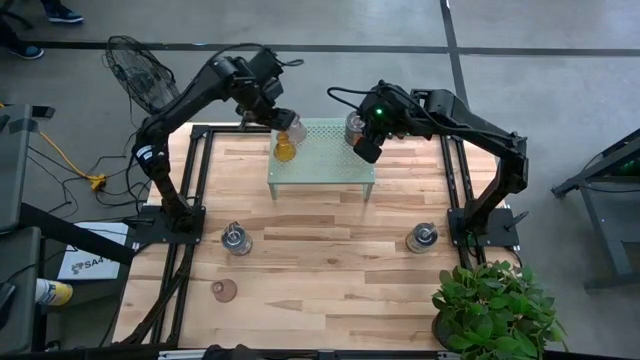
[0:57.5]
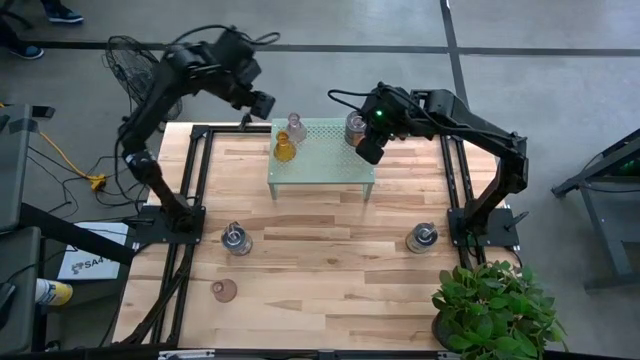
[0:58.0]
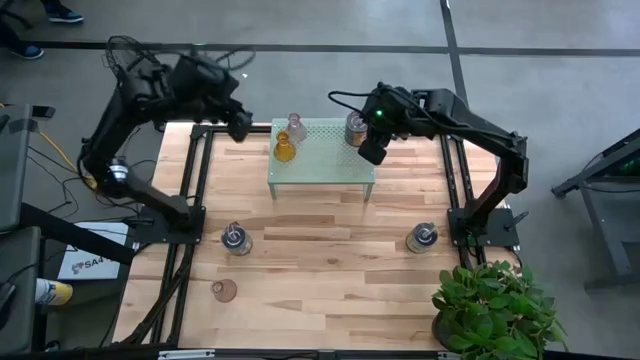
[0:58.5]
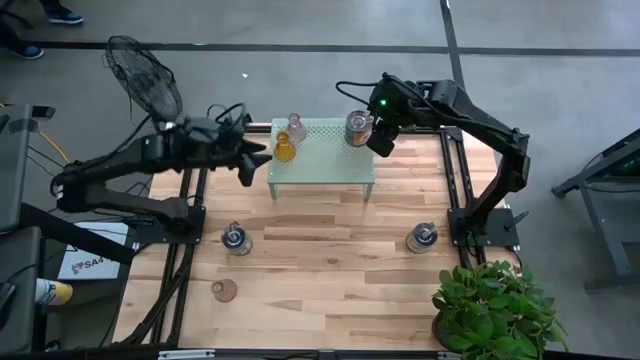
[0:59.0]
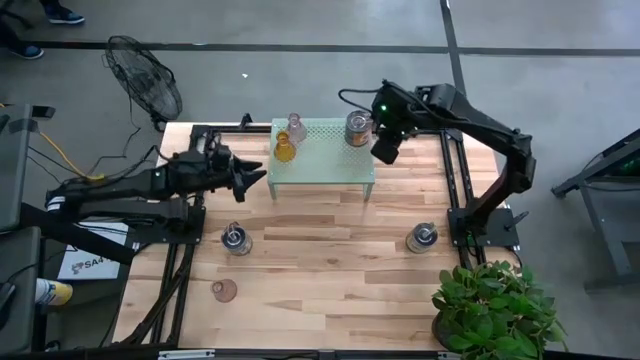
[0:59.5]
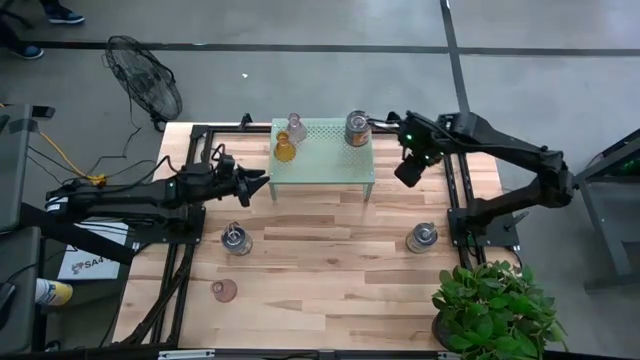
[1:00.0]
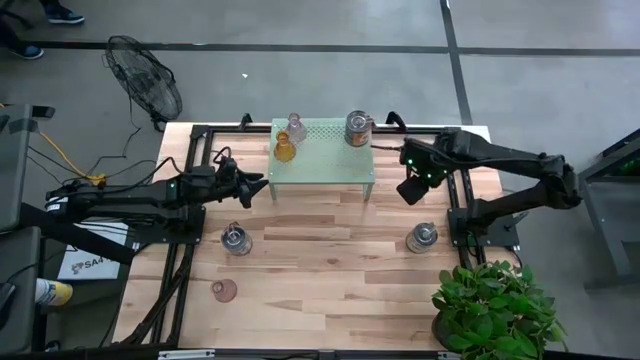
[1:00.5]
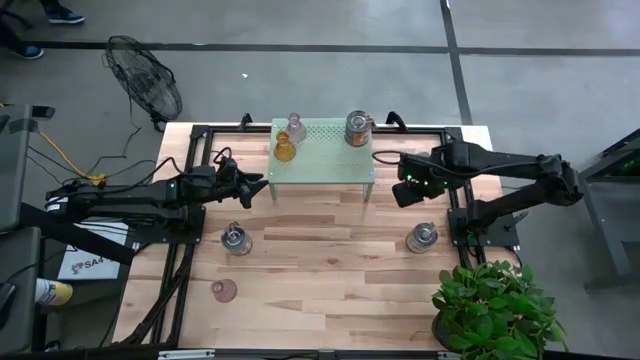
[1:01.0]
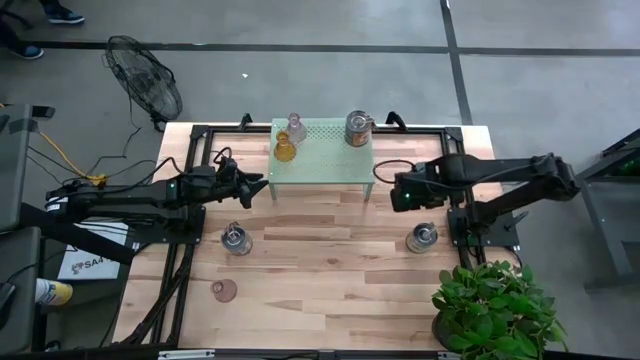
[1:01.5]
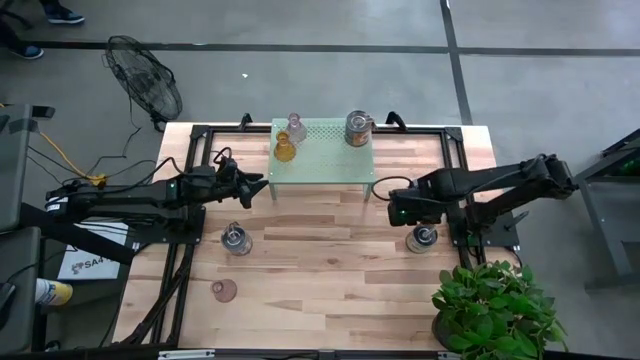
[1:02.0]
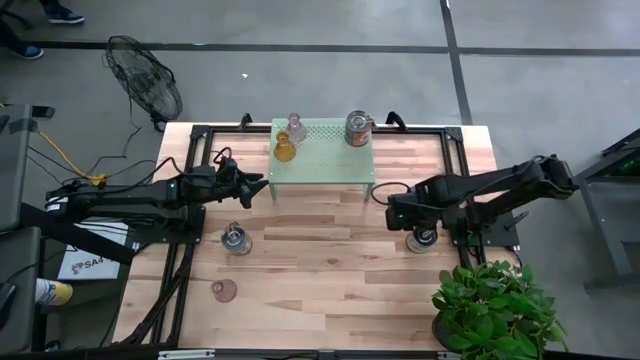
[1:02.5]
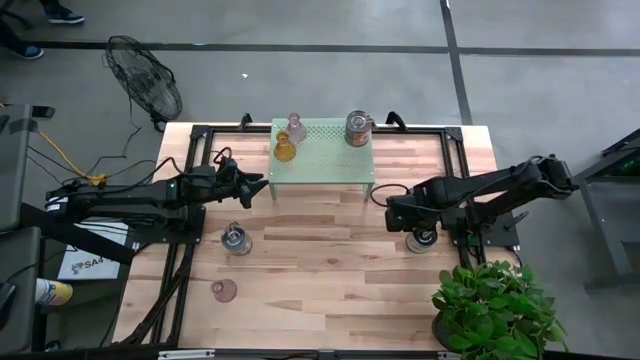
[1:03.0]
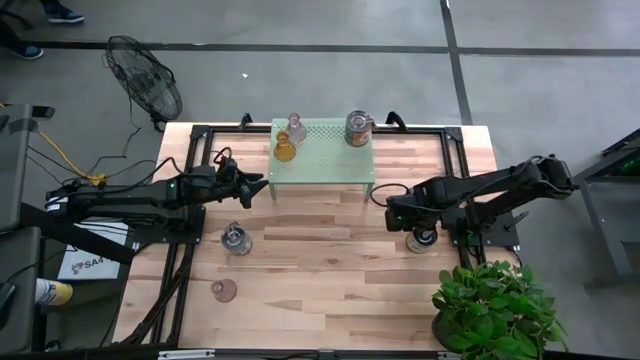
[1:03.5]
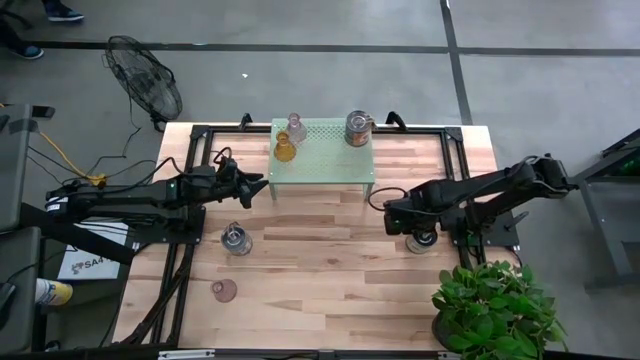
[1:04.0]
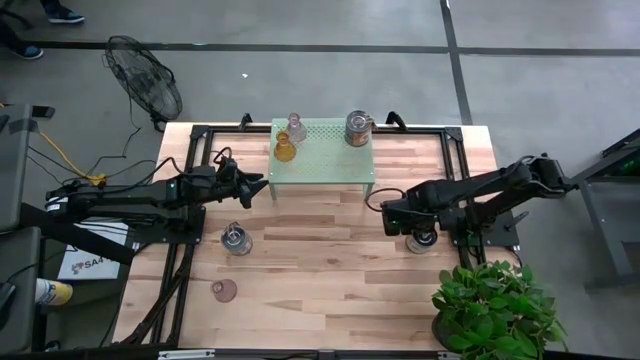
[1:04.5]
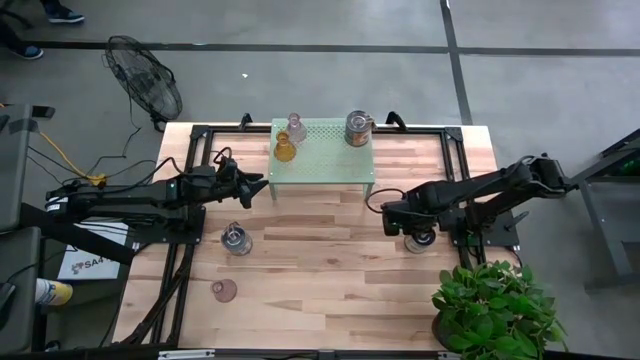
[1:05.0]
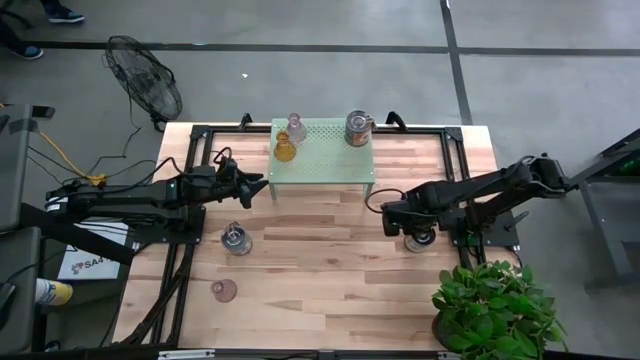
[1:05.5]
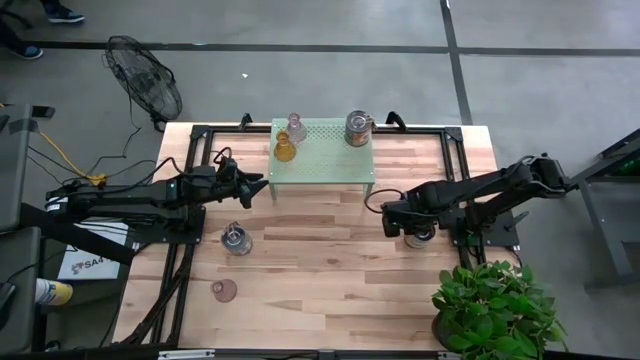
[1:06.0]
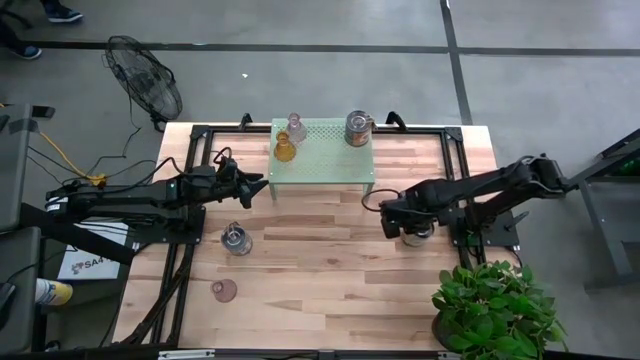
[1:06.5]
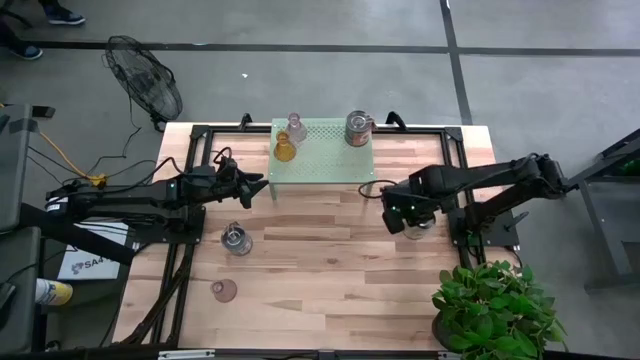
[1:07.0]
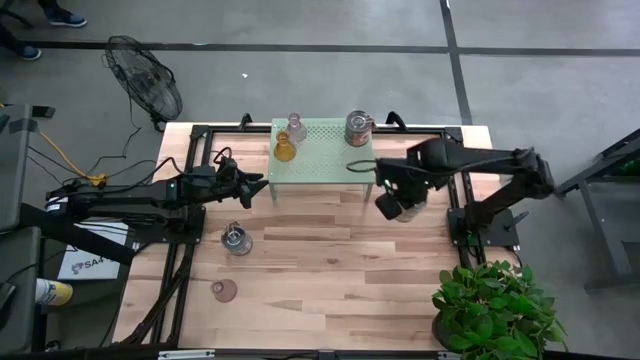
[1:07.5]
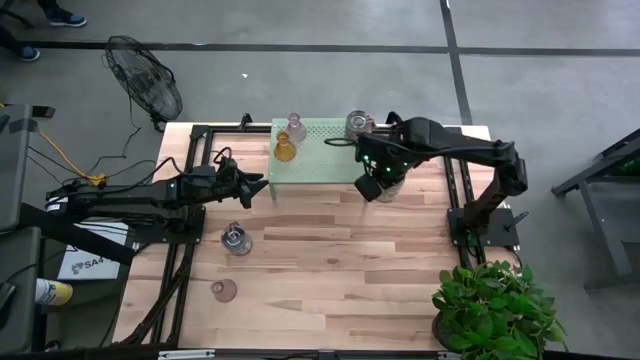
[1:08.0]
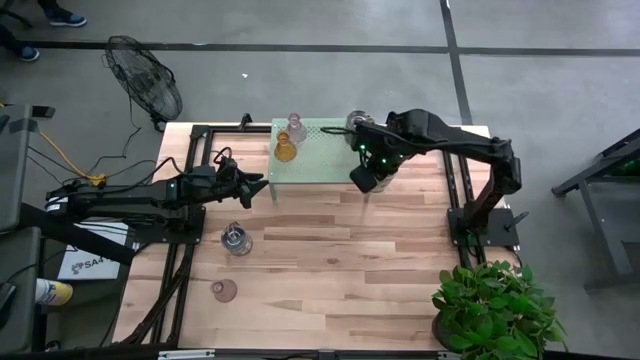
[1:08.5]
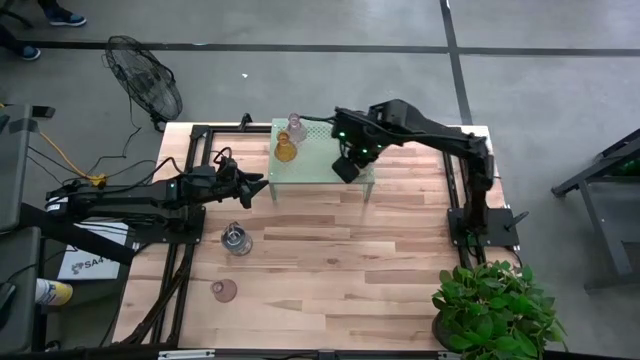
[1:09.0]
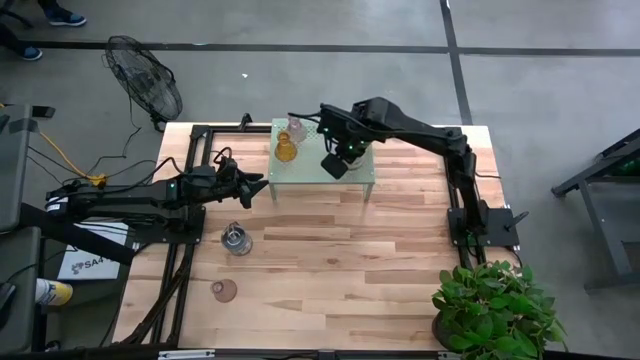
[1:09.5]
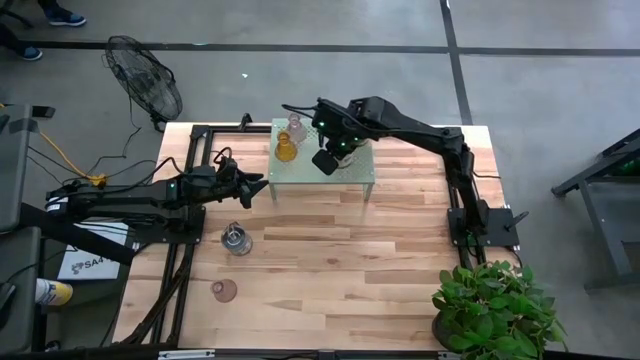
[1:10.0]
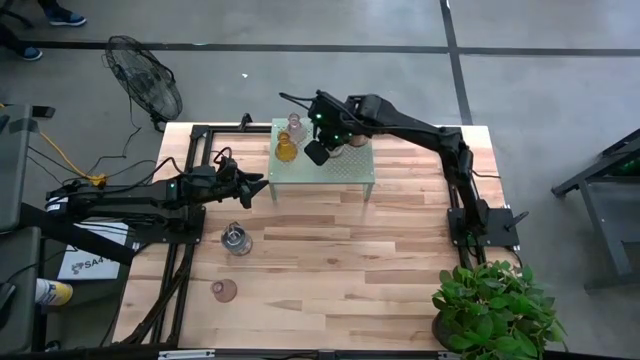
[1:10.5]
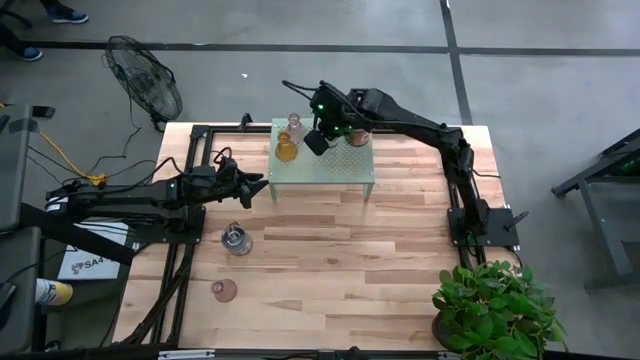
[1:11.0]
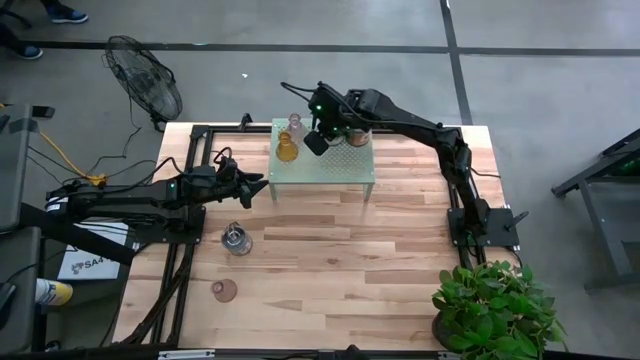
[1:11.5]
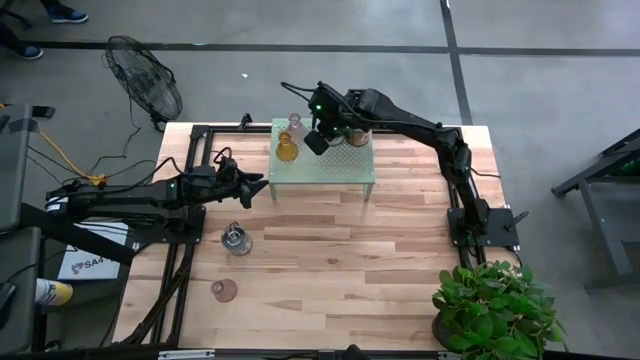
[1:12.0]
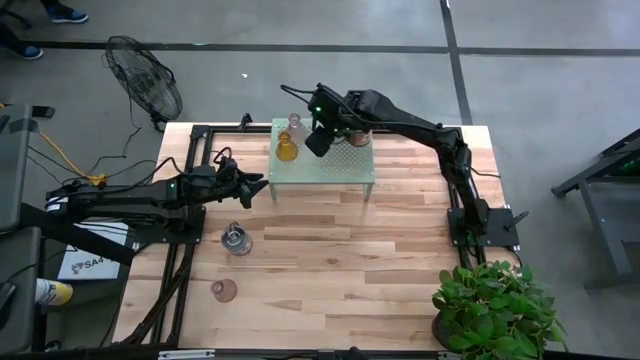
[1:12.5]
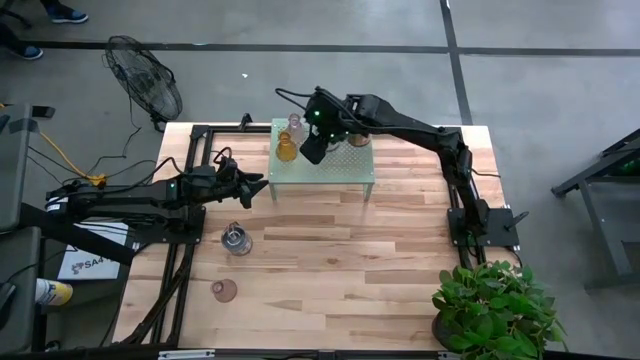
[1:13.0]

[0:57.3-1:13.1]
Task: Pick & Place candle stick holders
Put the right silver scented candle on the shelf

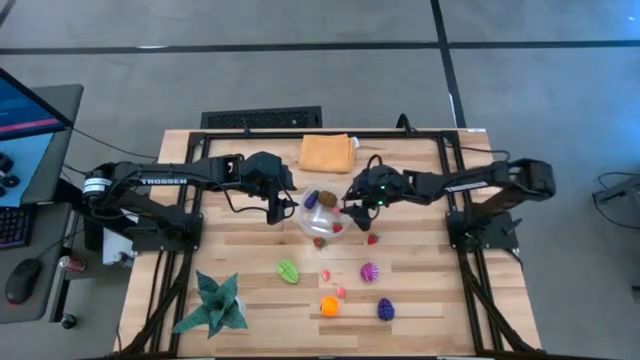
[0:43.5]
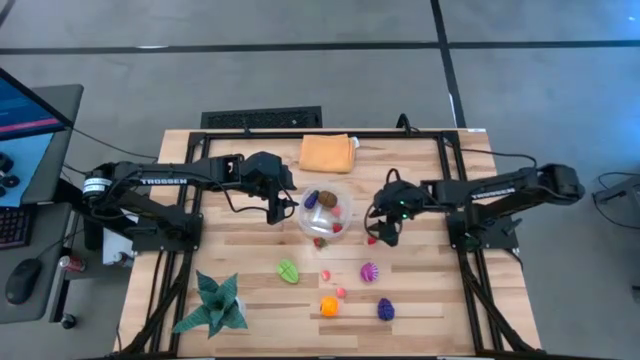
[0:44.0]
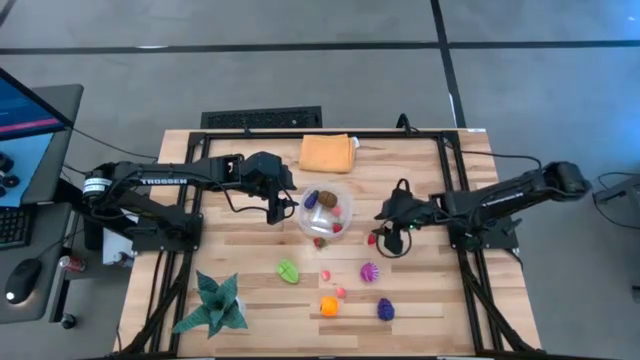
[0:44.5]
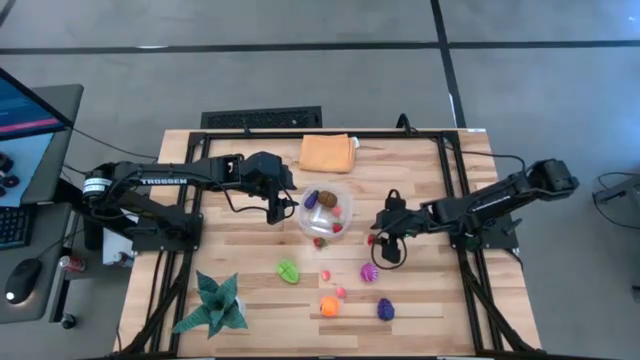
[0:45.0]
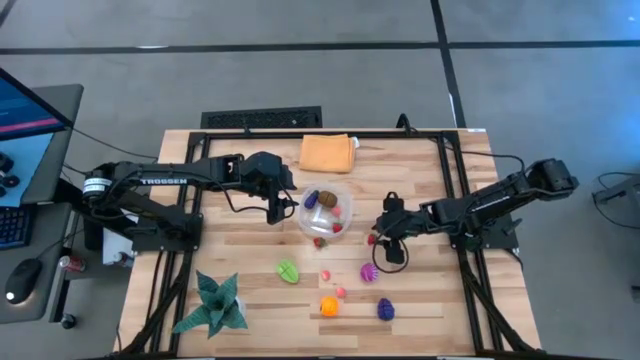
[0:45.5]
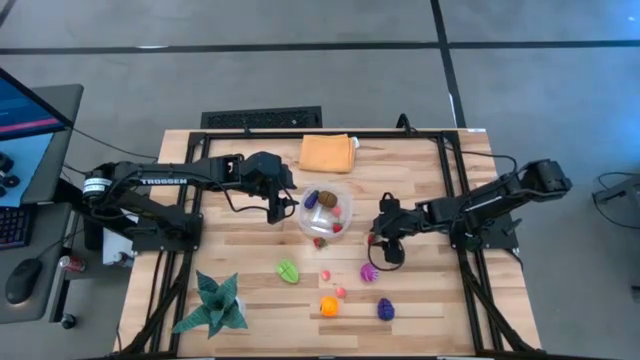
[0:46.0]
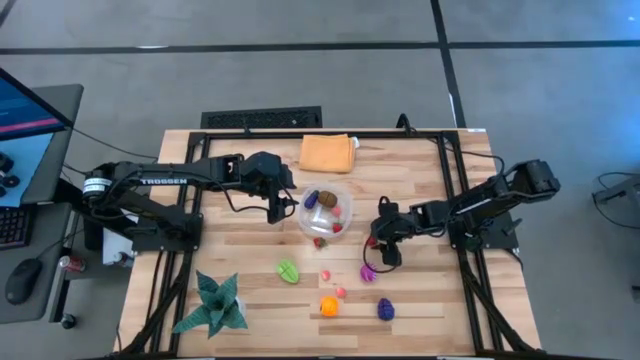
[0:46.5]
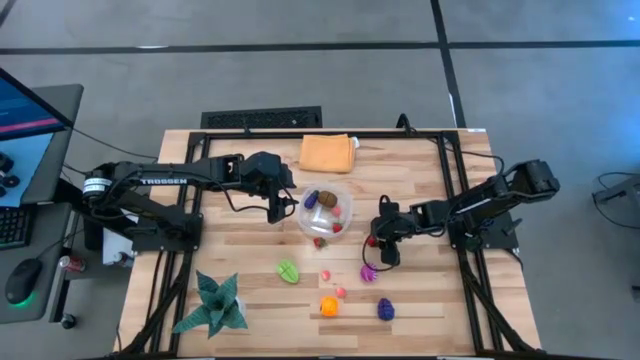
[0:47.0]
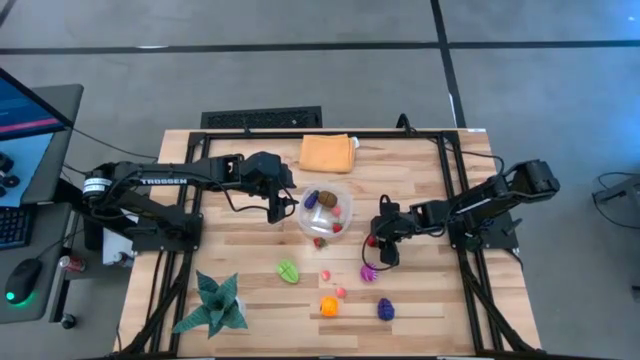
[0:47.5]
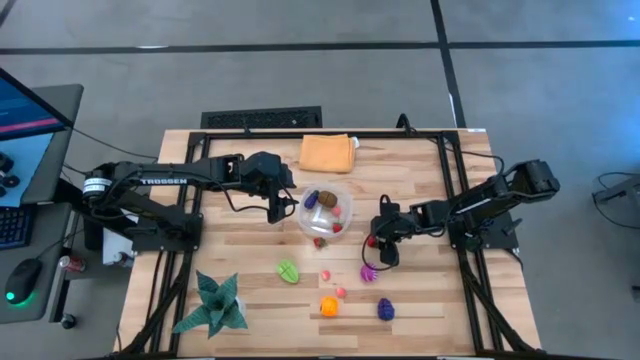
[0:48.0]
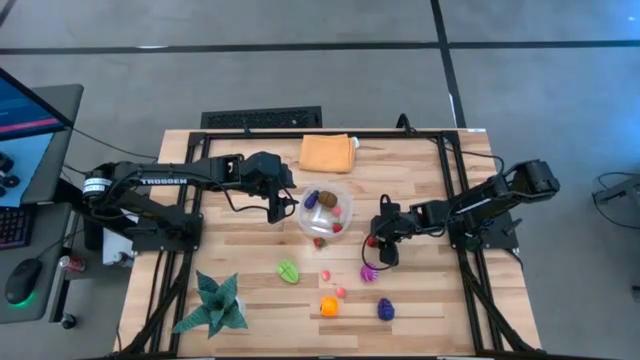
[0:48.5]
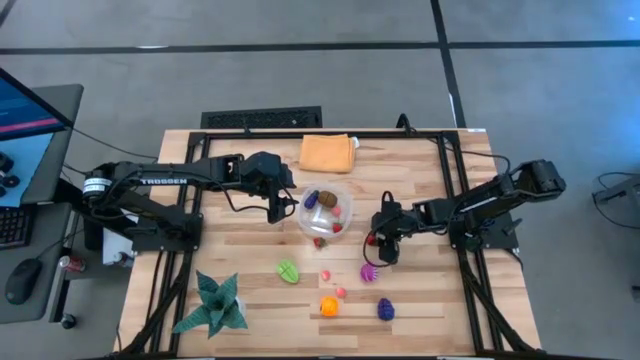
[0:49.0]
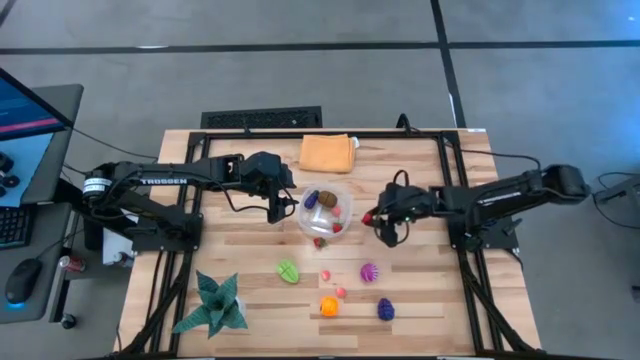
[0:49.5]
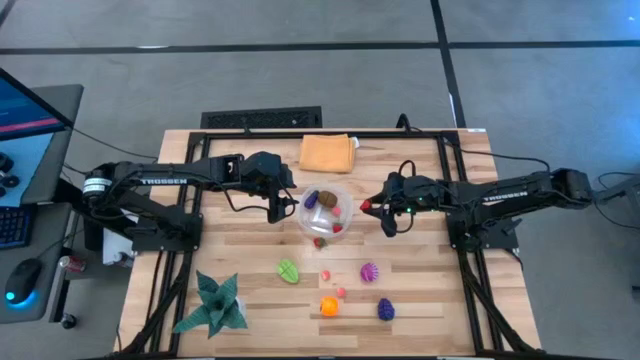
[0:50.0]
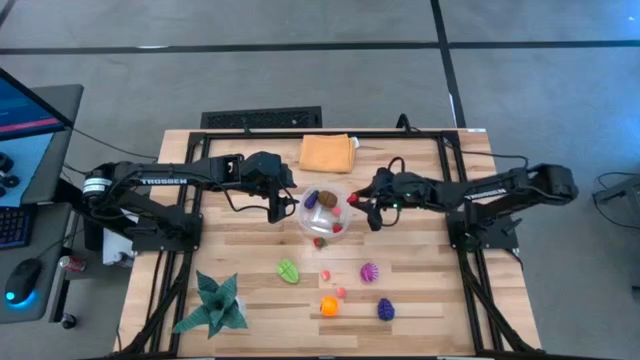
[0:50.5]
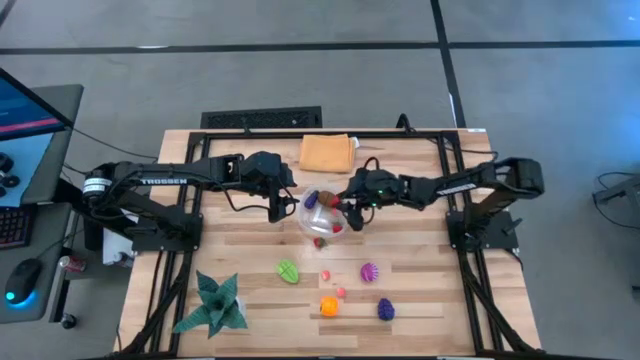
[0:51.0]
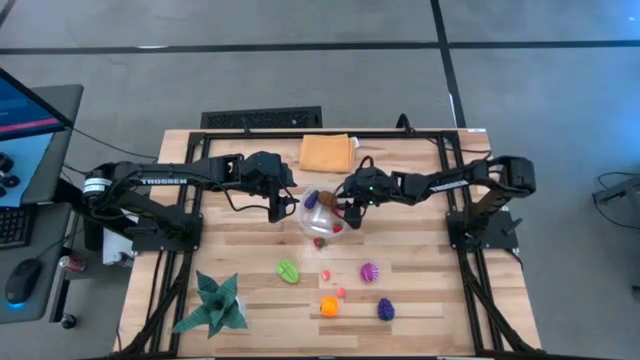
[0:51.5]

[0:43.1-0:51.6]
Task: Pick and placing Produce into tupperware
Put the right red strawberry into the transparent container
